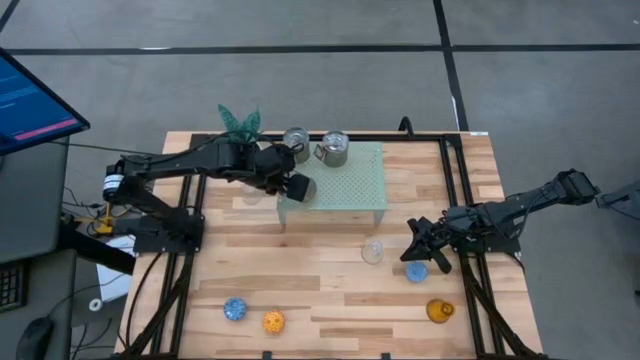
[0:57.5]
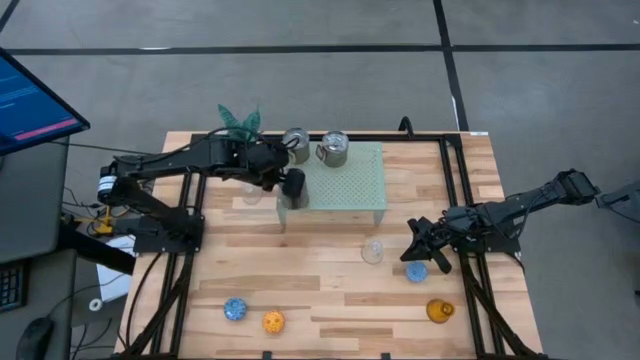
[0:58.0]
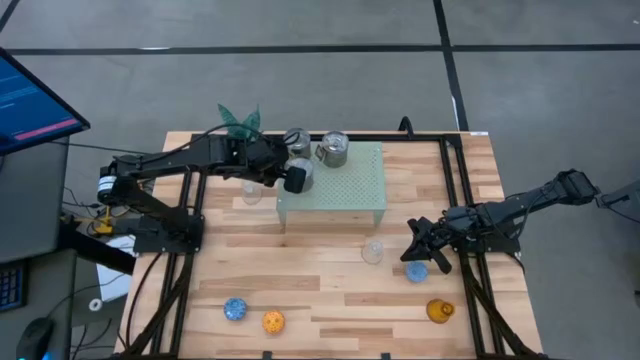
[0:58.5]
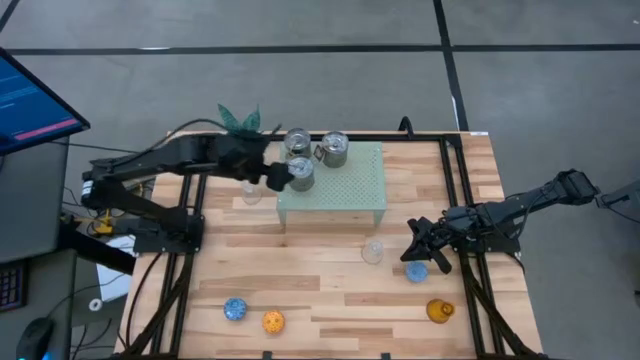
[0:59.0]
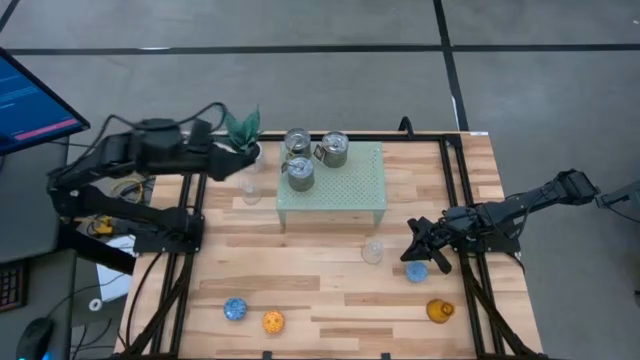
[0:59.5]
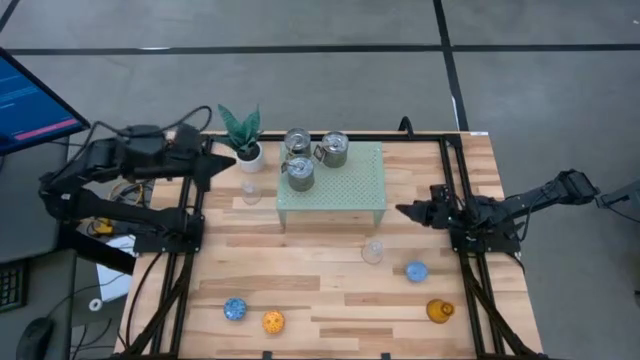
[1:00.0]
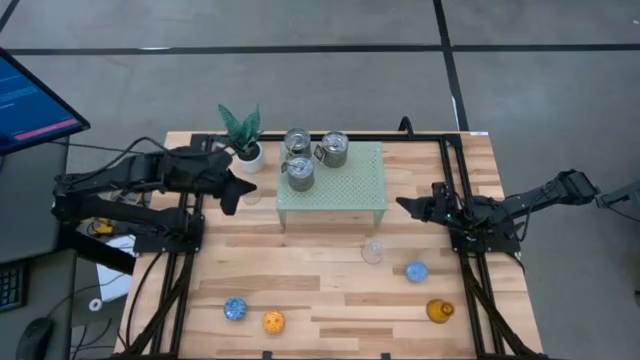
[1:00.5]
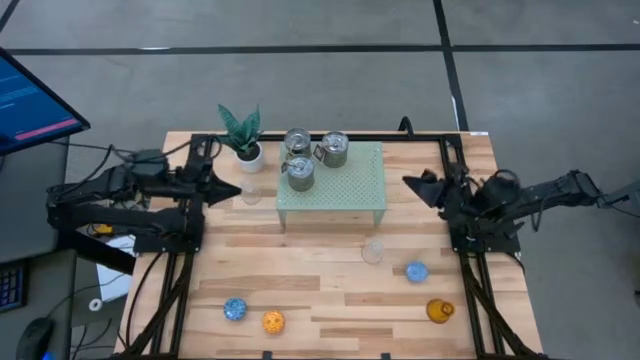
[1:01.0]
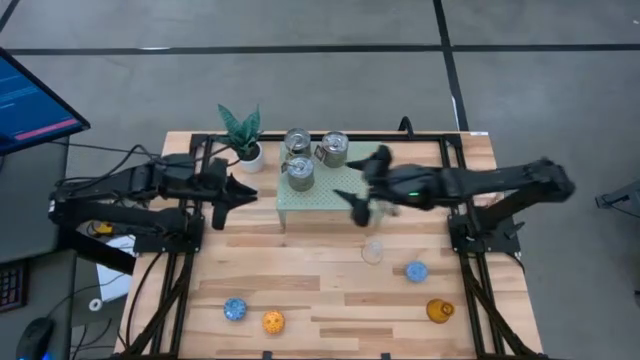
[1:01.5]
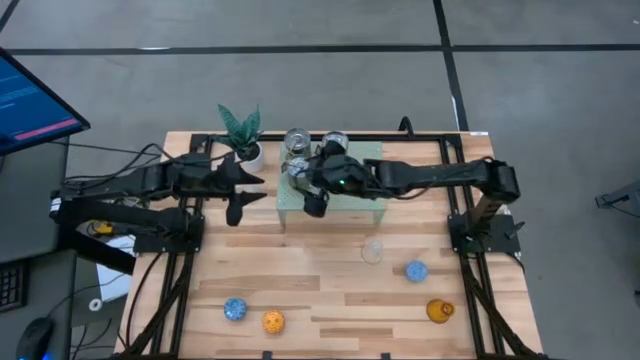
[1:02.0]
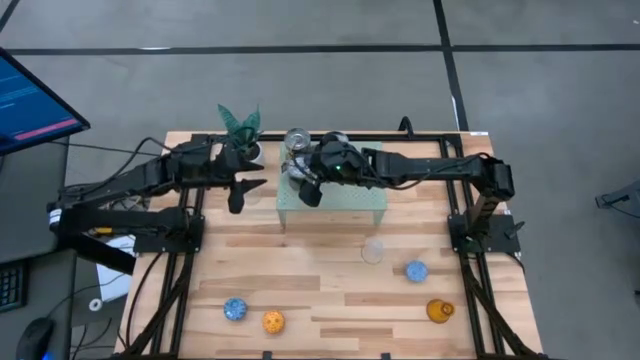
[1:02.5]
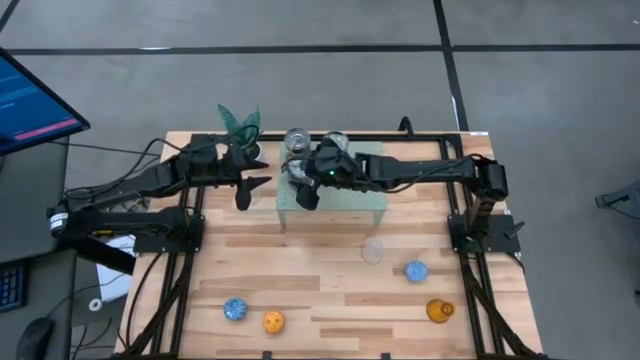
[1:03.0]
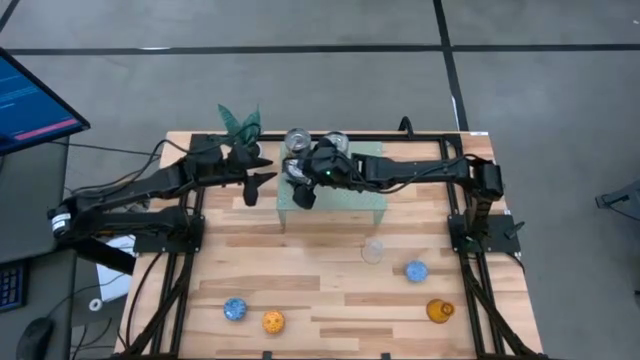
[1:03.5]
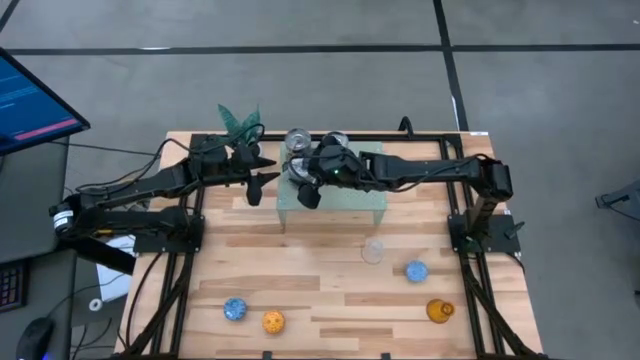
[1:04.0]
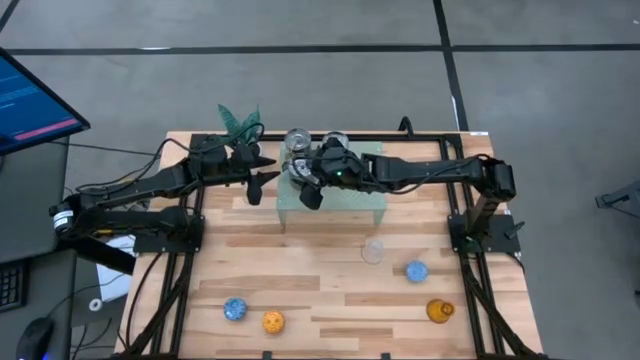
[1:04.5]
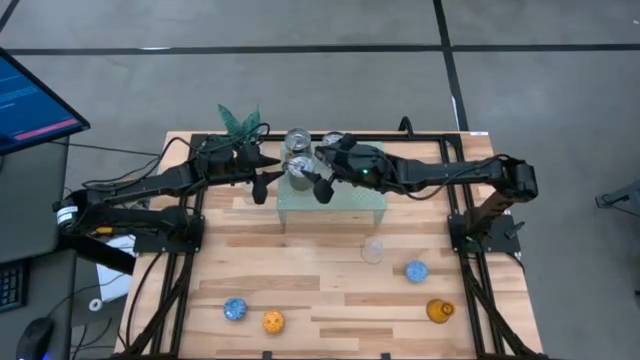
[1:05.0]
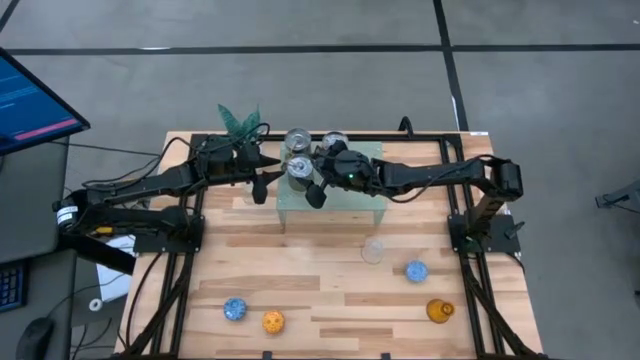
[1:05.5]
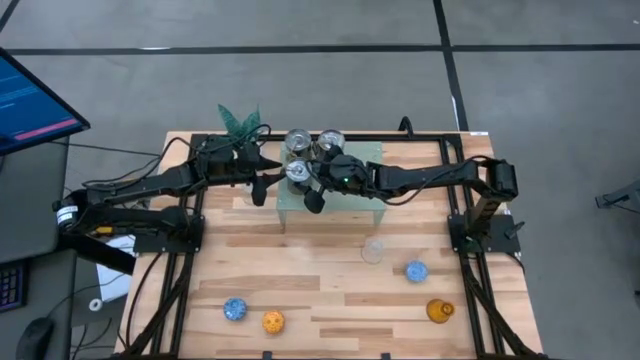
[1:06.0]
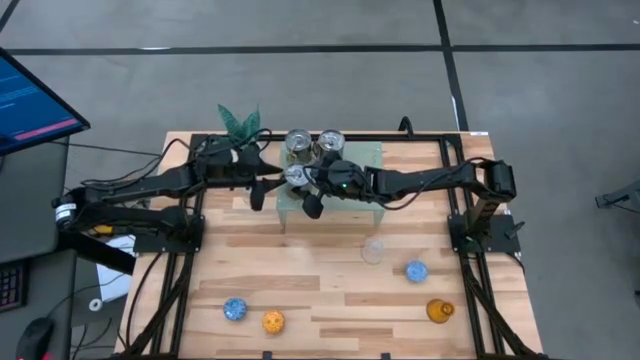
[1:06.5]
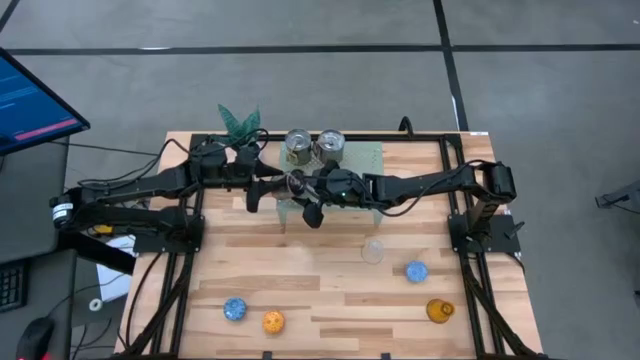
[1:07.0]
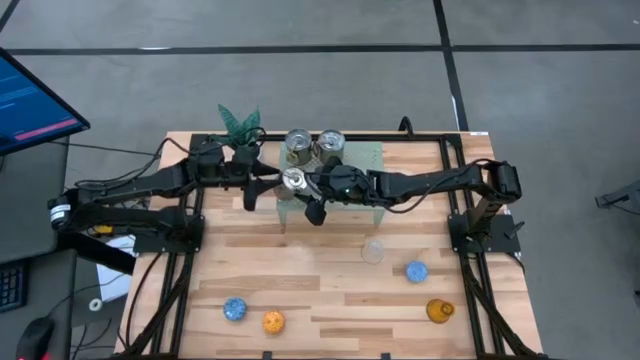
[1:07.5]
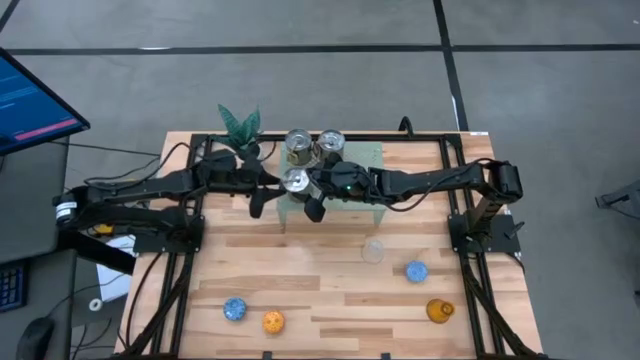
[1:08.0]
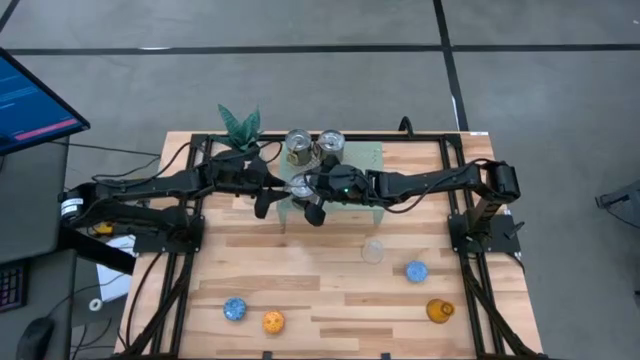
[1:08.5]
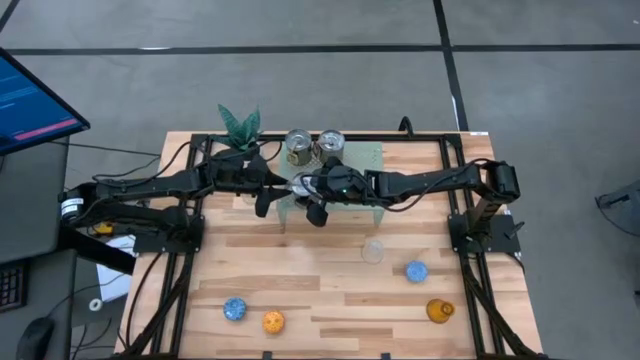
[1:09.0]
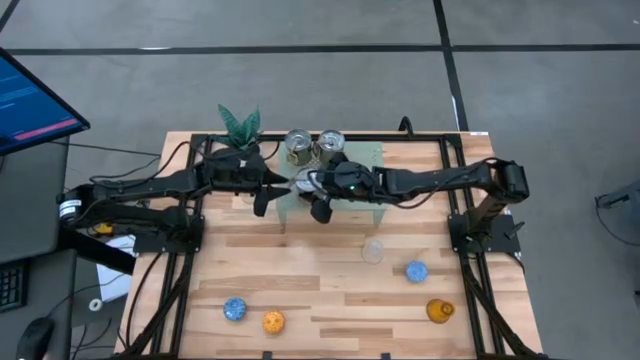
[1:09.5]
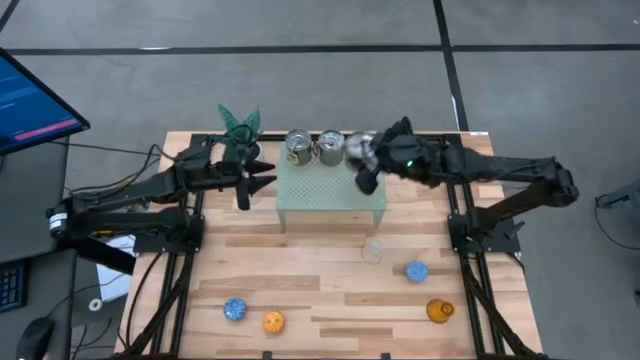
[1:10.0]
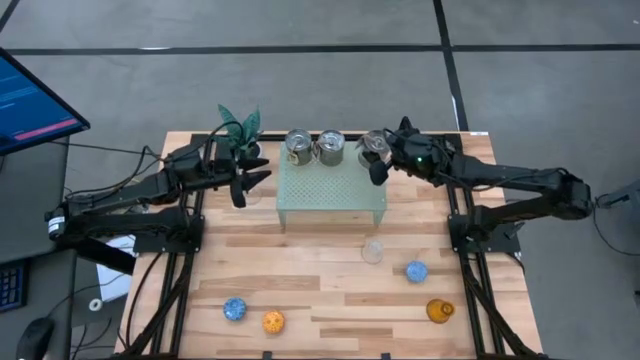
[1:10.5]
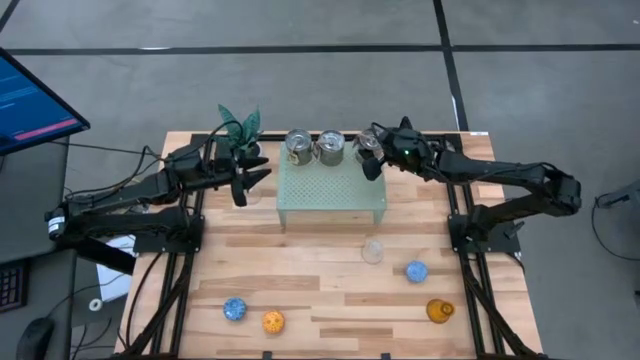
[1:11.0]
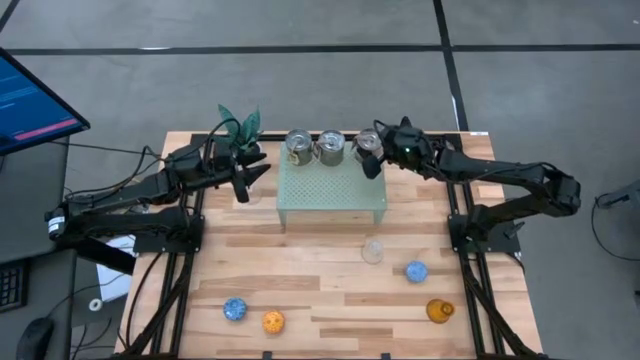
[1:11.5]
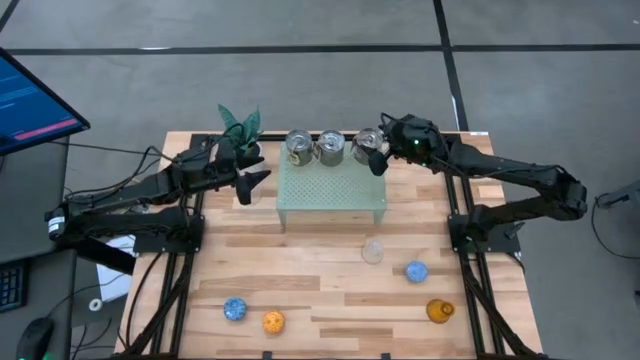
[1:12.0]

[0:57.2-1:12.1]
Task: Pick & Place candle stick holders
Put the silver scented candle can on the shelf

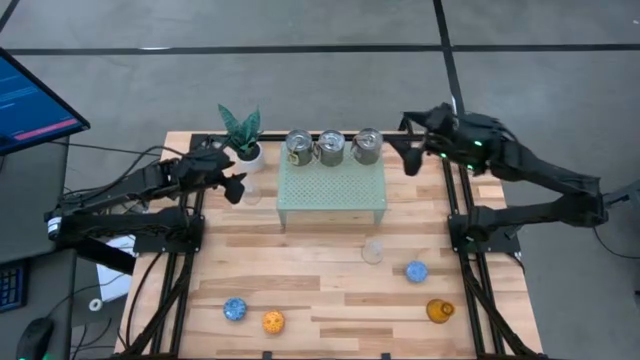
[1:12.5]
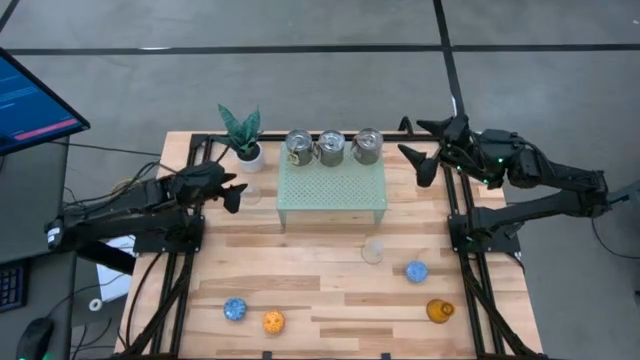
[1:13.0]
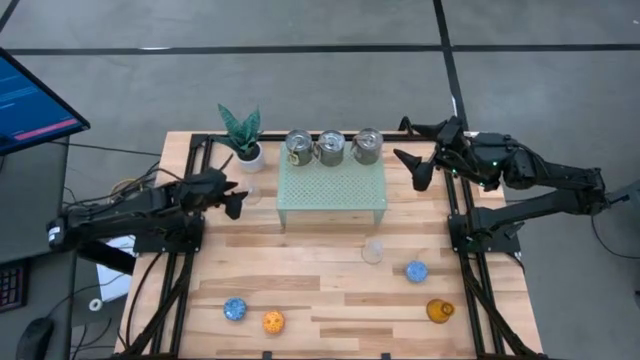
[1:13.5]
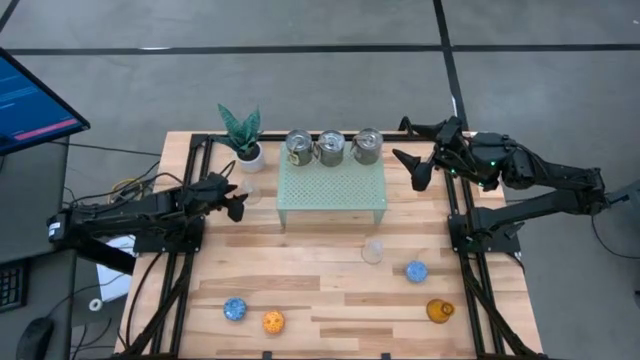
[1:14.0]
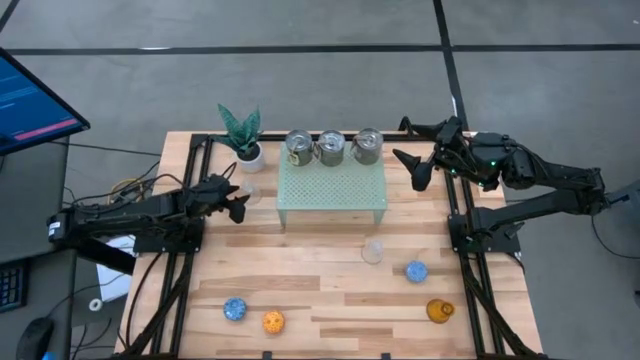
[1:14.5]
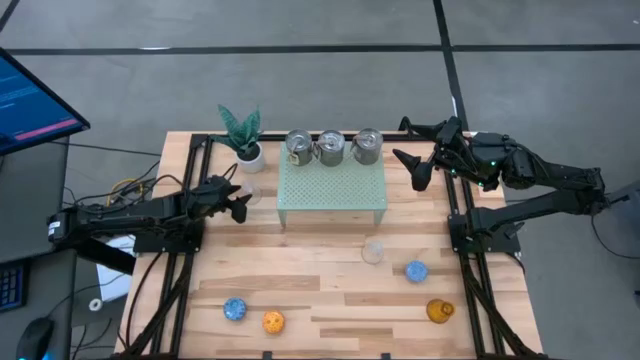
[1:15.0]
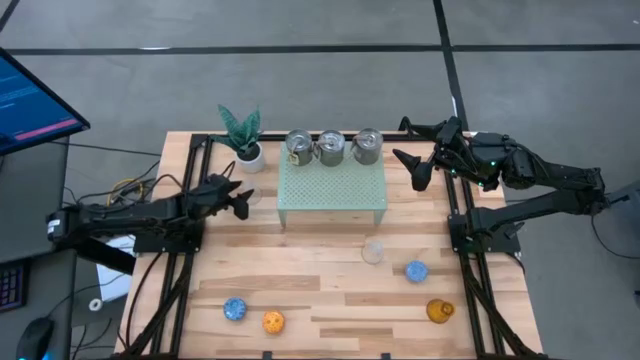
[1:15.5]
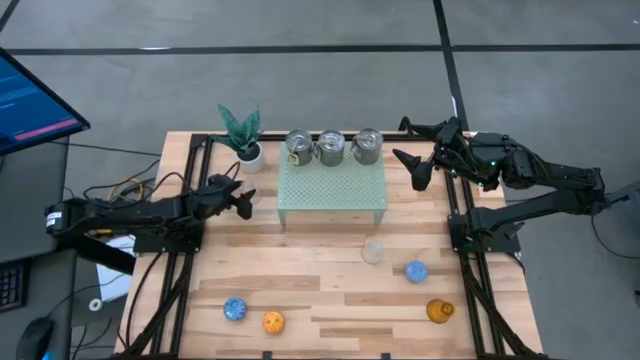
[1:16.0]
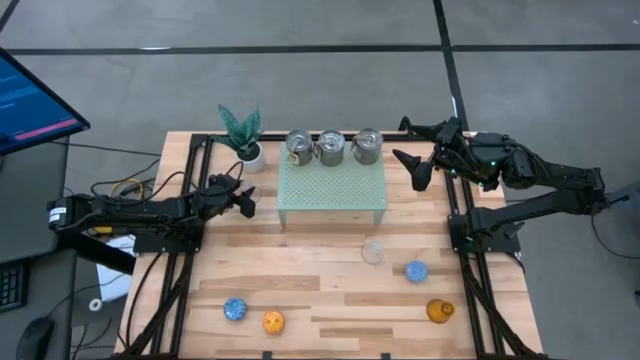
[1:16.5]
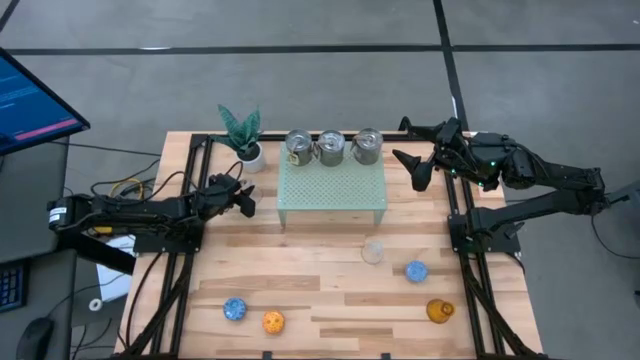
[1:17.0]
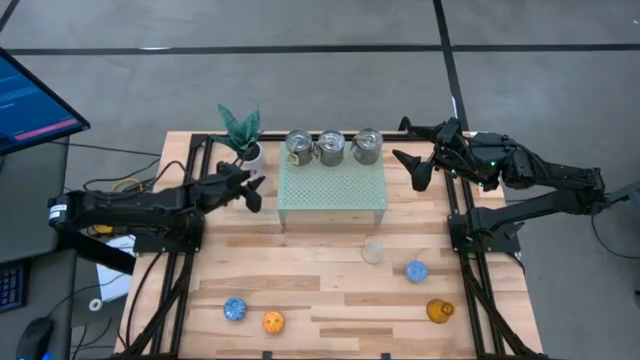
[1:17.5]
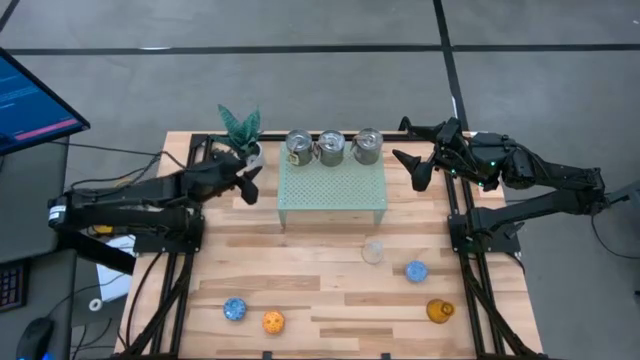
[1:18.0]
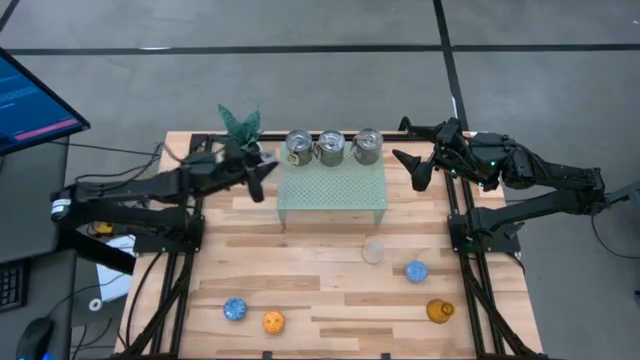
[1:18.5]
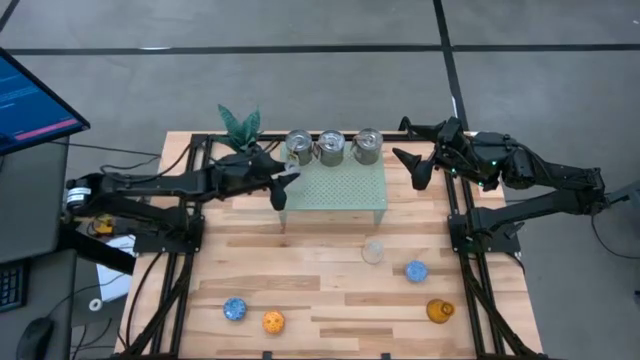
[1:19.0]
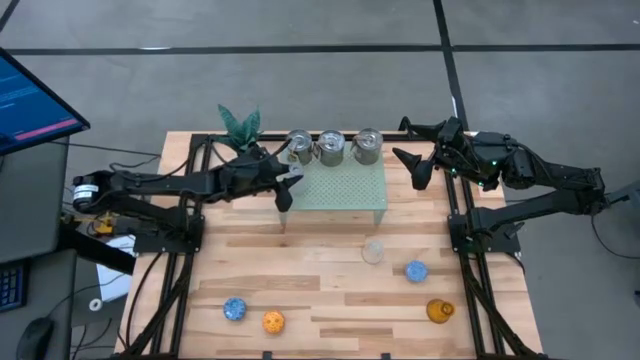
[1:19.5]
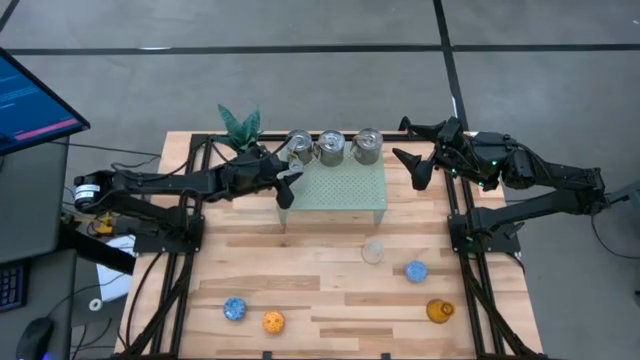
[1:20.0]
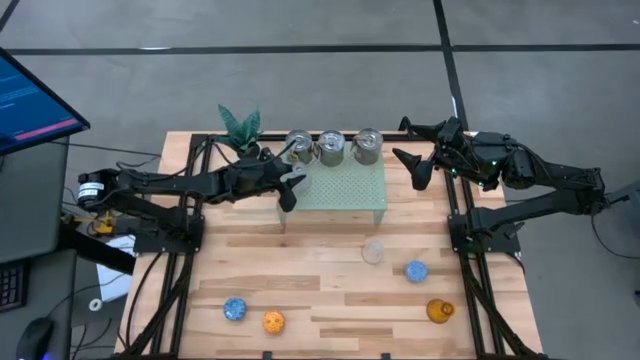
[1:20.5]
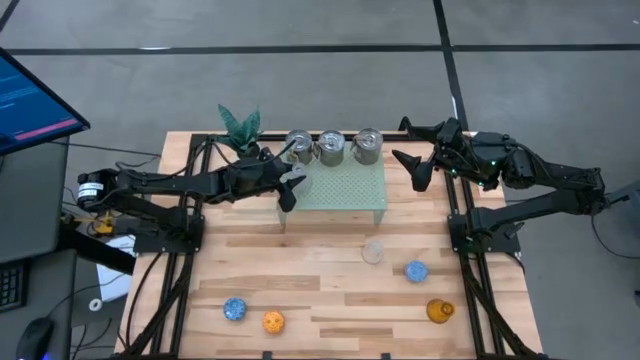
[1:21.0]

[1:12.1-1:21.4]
Put the top transparent glass candlestick on the shelf
